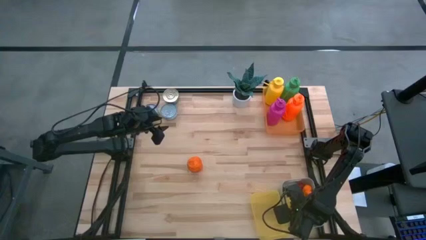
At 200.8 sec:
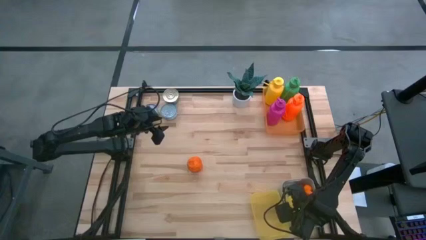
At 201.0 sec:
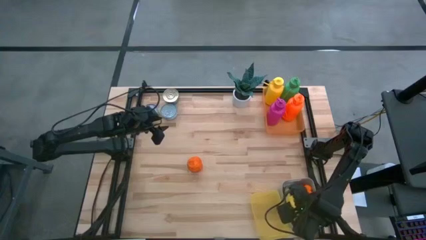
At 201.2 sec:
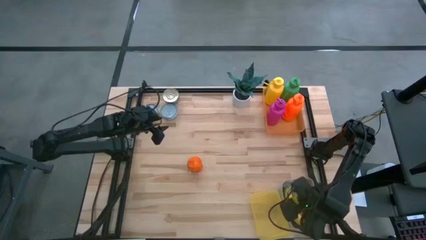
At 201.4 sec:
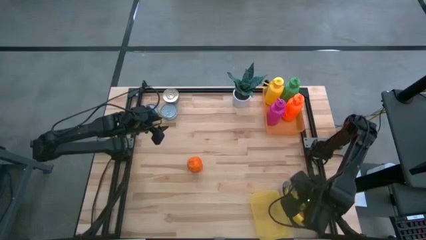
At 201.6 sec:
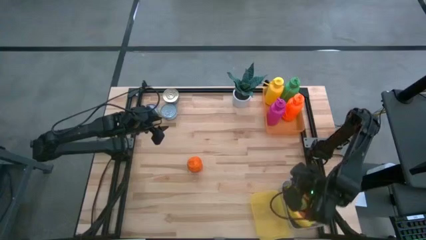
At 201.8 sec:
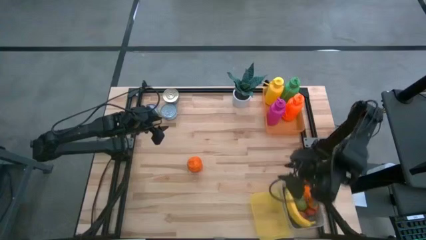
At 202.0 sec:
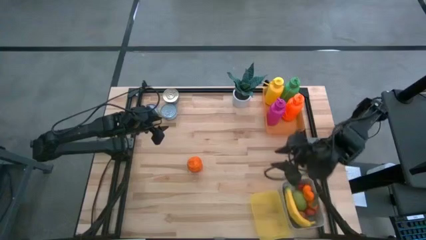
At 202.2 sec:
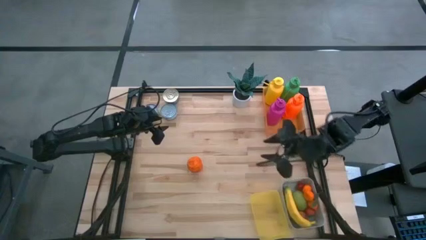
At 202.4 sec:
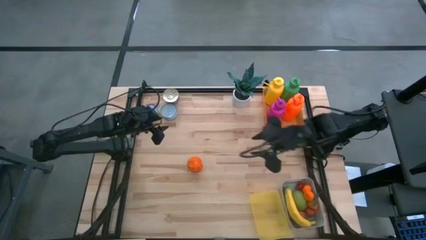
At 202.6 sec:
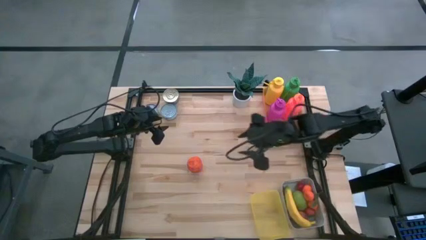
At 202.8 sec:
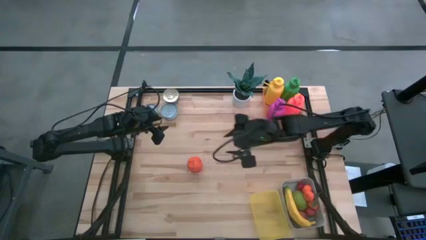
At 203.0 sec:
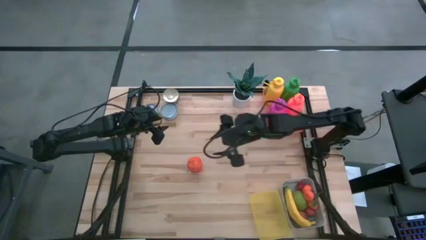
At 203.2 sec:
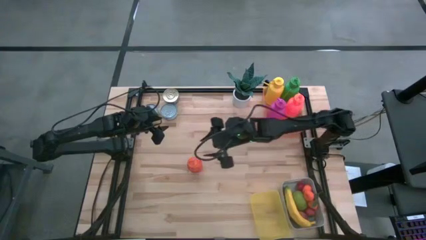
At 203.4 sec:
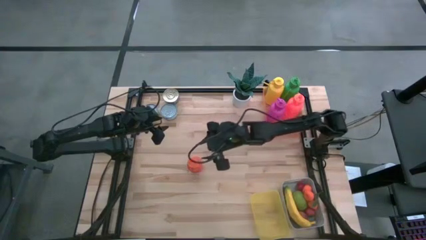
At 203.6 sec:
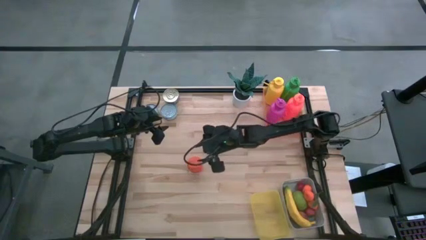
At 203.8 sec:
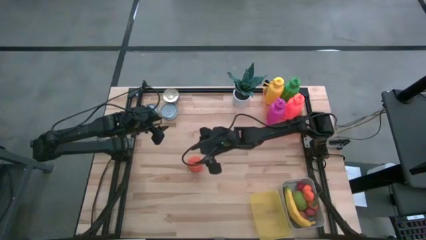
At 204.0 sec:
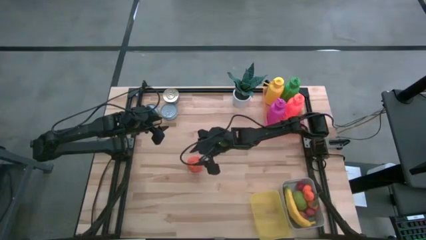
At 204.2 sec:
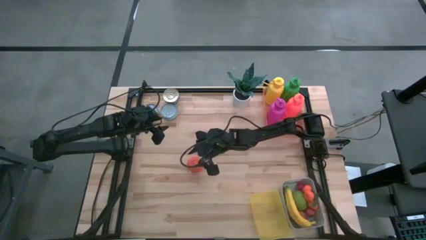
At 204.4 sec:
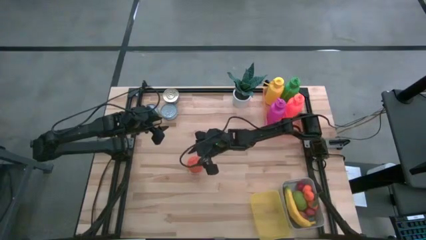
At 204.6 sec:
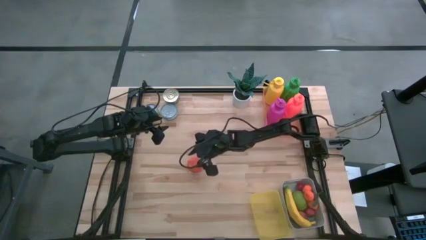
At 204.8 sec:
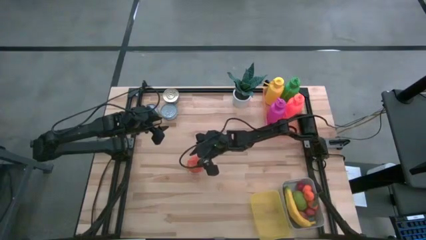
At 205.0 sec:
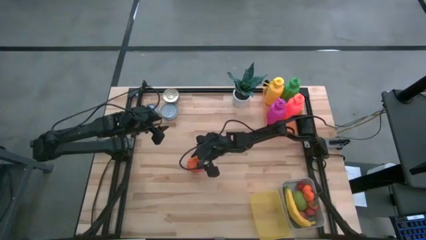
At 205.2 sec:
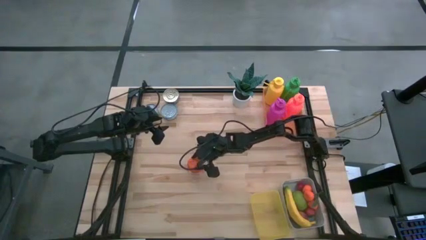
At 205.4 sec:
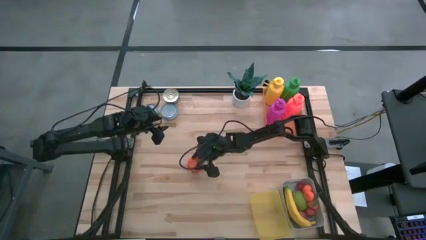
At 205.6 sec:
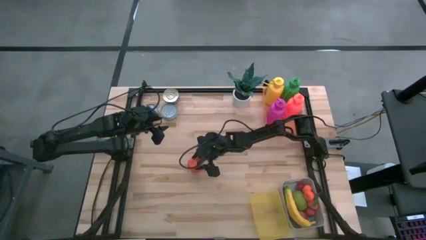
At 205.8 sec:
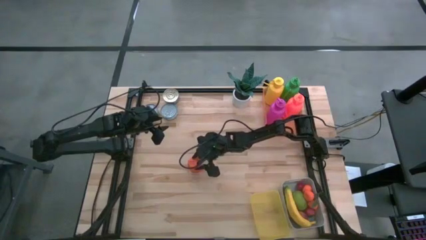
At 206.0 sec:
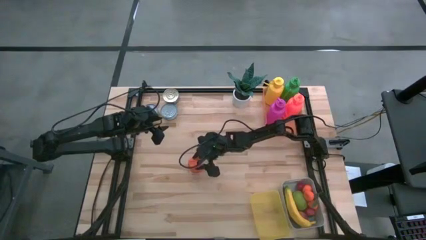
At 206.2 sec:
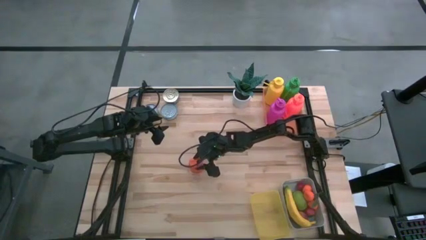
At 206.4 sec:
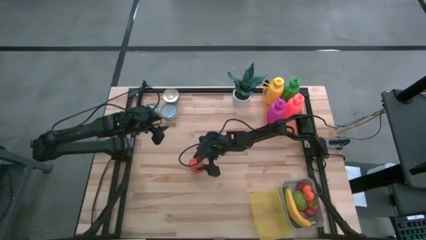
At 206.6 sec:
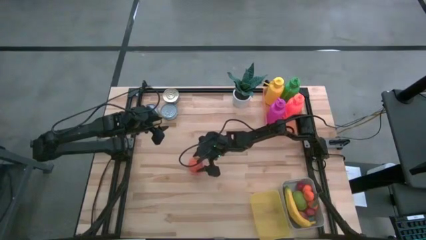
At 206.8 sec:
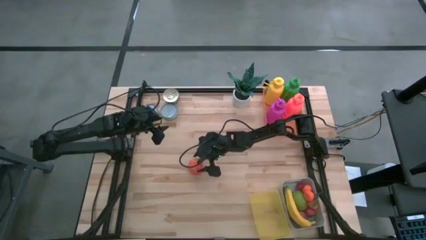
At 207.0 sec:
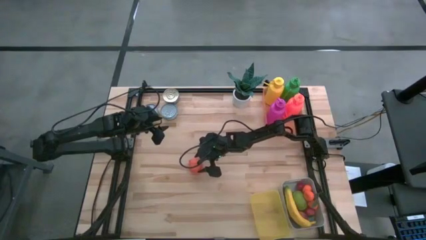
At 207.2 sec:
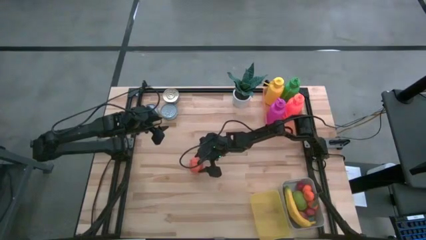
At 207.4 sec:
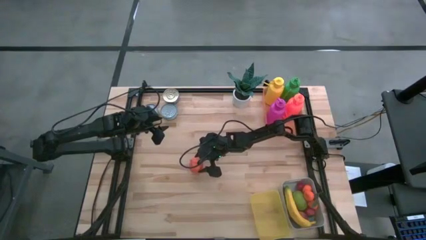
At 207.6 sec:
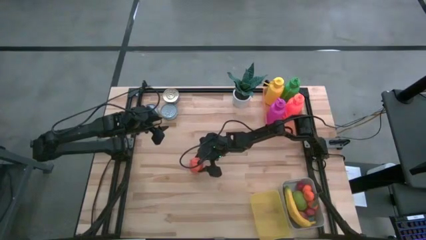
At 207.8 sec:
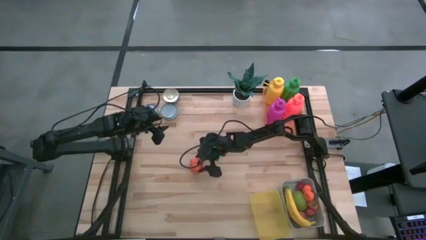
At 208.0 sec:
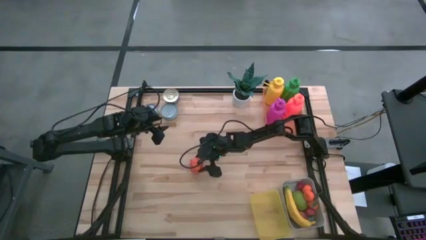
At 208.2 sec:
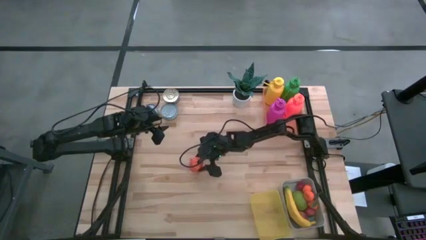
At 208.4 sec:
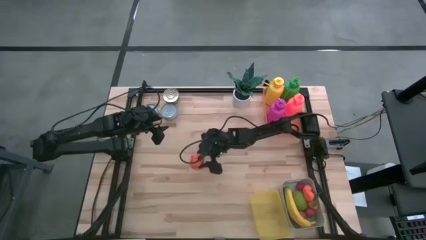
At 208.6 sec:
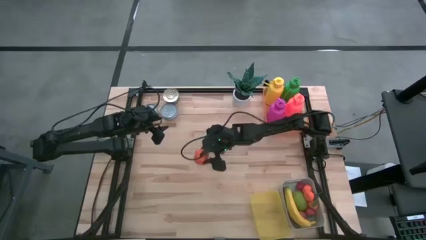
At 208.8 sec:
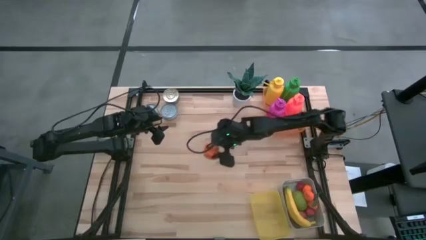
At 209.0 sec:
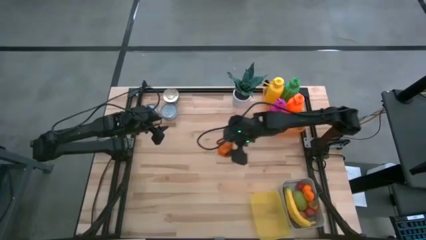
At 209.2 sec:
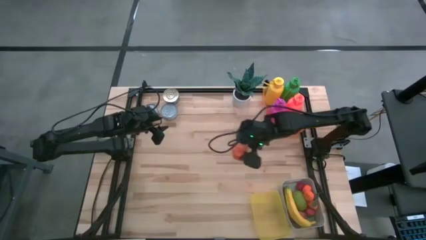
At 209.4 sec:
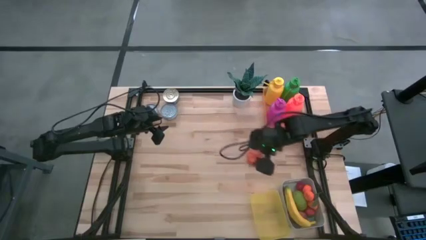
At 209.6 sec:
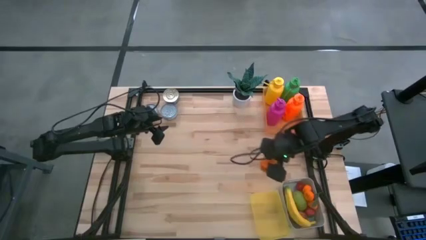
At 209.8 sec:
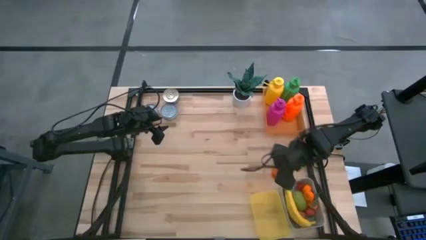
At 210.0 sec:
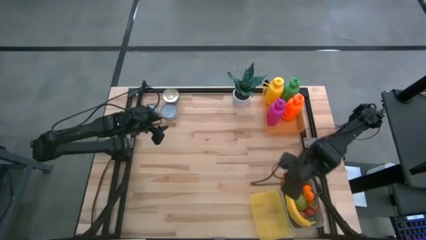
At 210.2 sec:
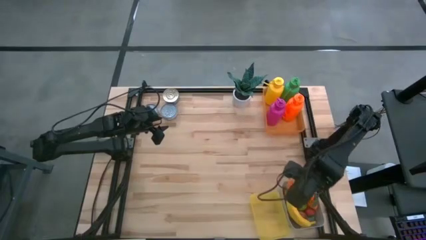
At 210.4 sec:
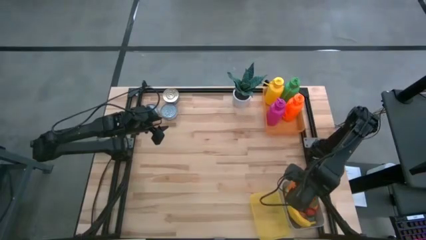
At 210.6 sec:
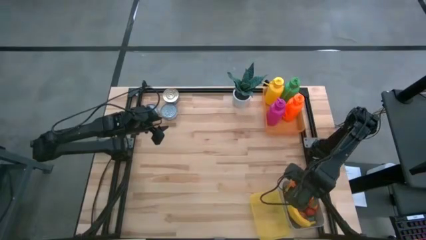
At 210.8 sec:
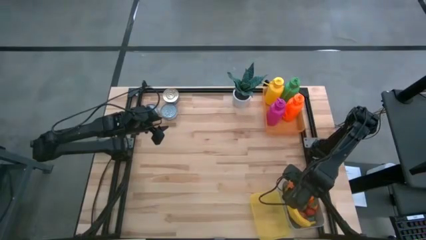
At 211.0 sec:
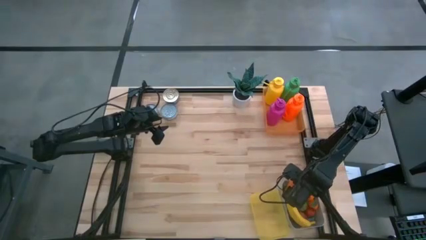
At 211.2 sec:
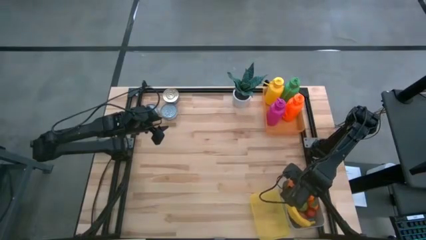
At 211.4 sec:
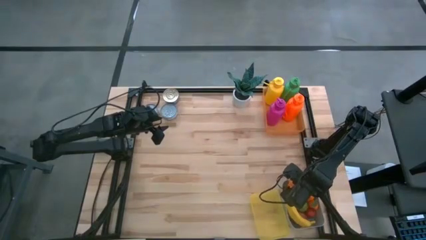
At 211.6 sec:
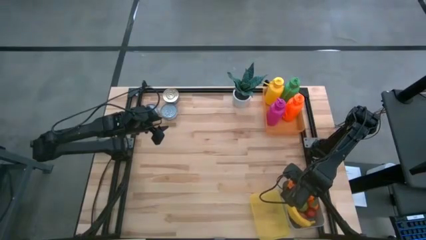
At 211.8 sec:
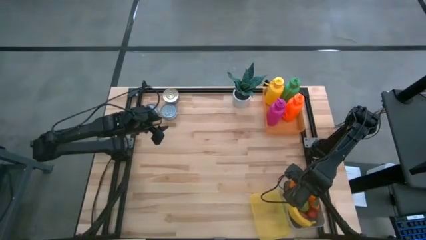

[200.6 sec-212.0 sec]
Task: Pick & Place Food Item
Put the orange into the gray bin
